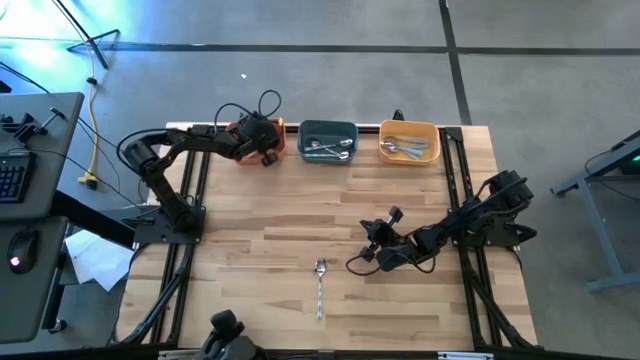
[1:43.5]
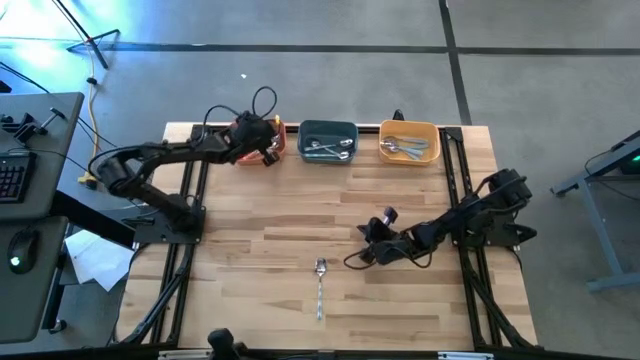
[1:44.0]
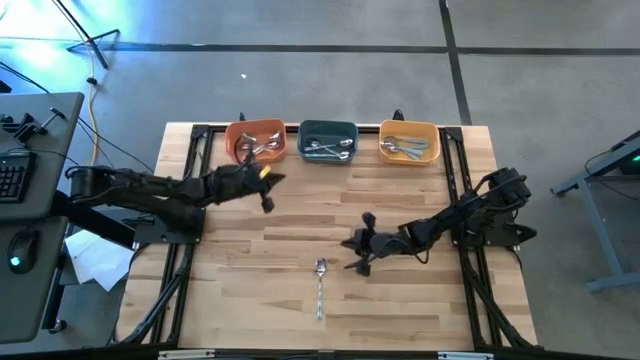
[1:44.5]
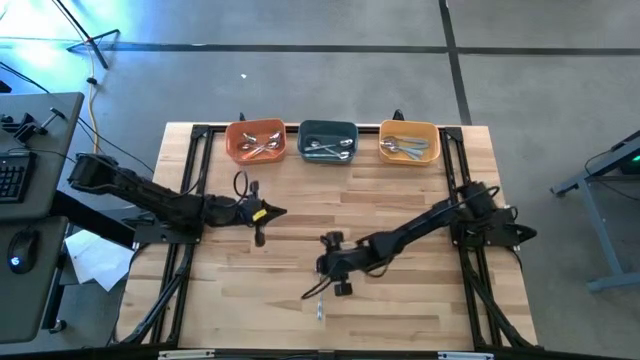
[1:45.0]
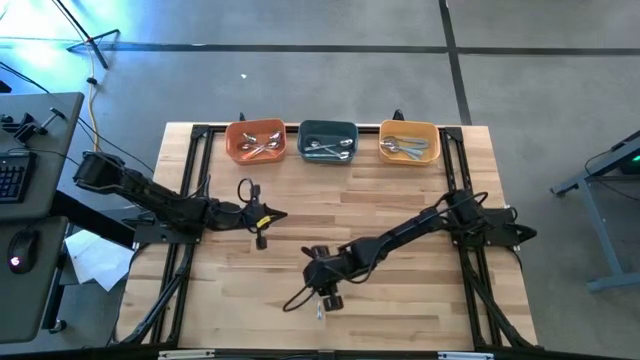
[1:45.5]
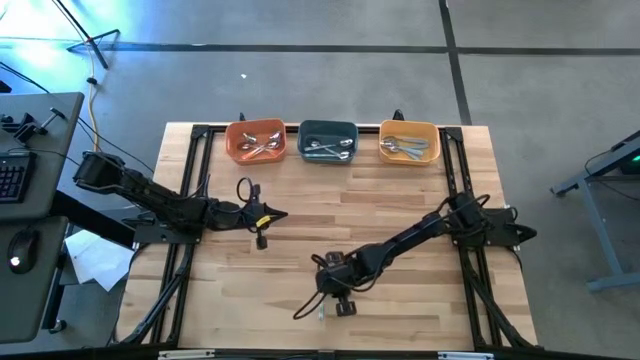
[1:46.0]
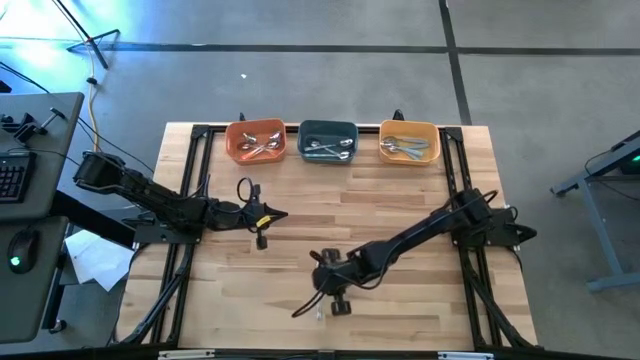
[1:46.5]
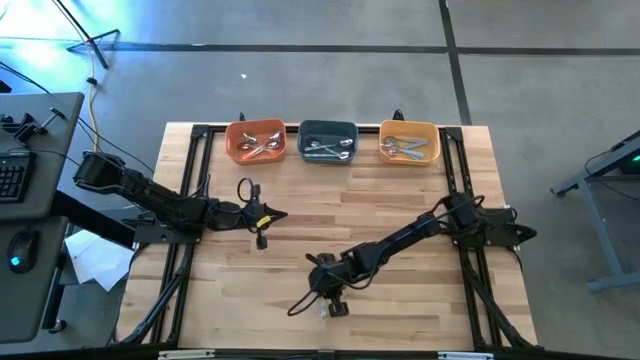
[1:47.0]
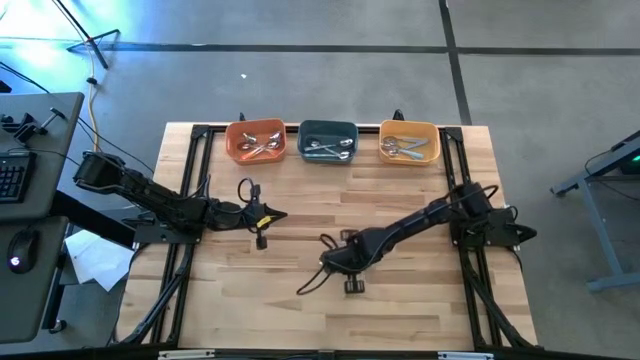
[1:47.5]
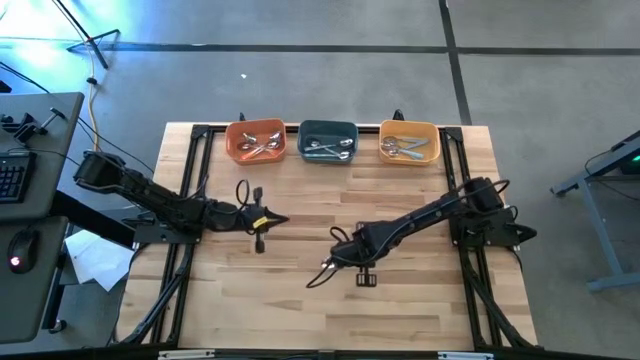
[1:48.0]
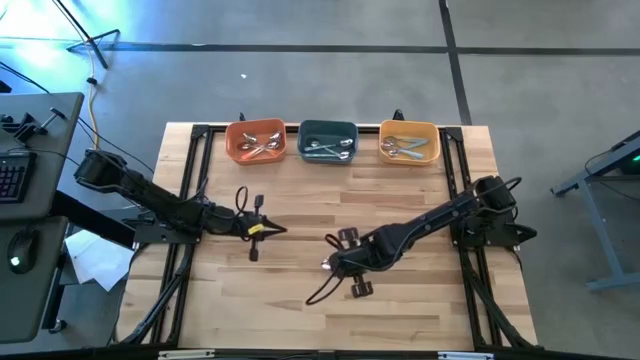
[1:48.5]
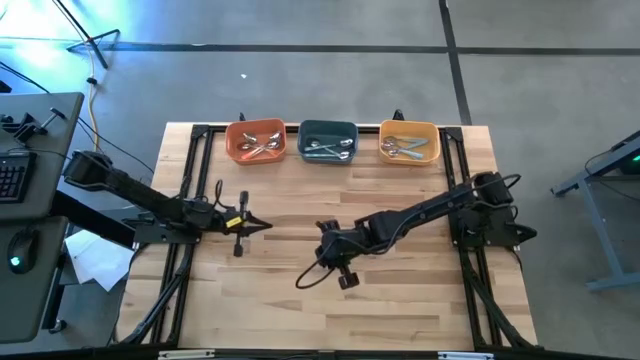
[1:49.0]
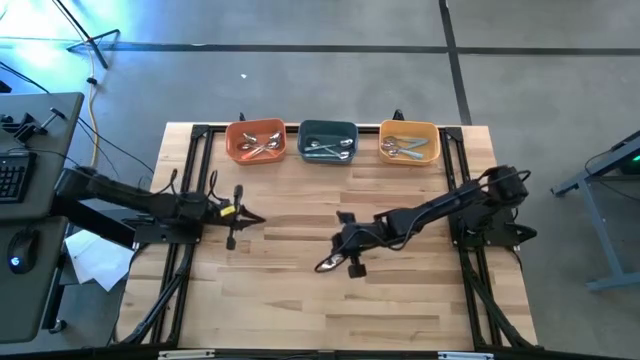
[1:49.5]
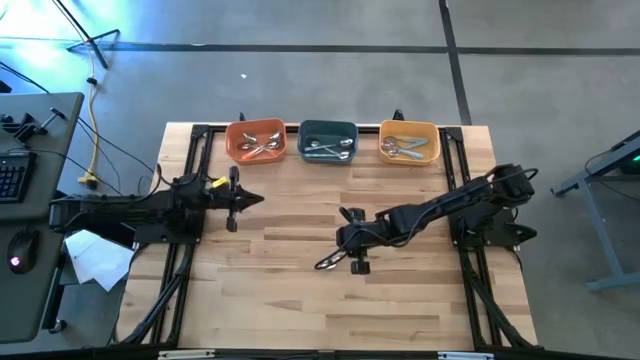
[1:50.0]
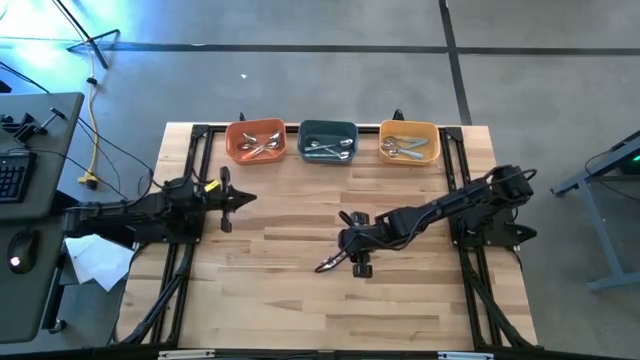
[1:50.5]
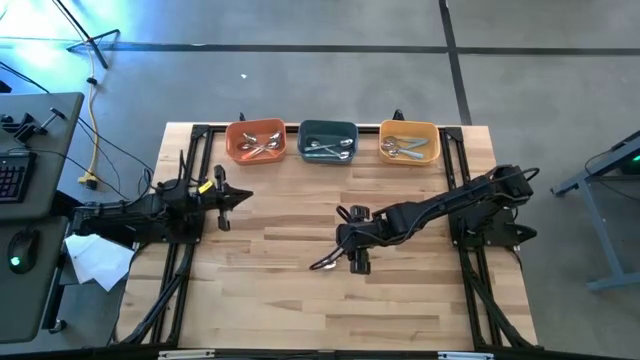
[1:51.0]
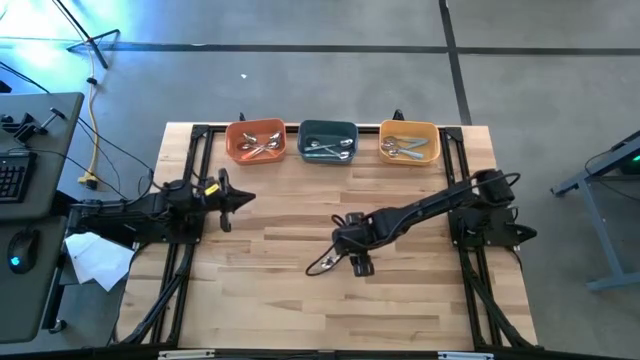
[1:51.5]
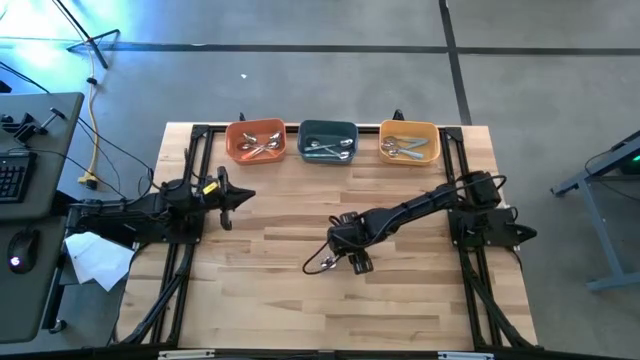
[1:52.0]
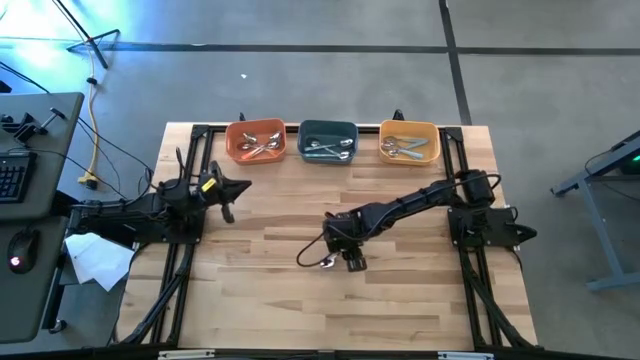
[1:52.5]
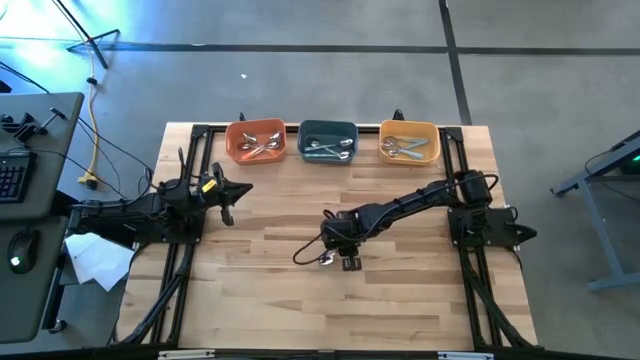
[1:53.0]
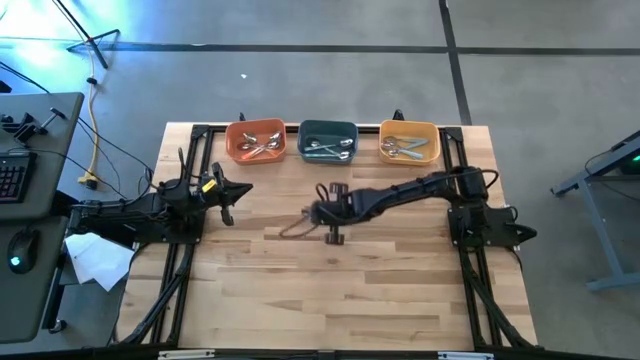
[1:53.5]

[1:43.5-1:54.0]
Task: Sort silverware by color (type)
Put the white spoon into the blue bin

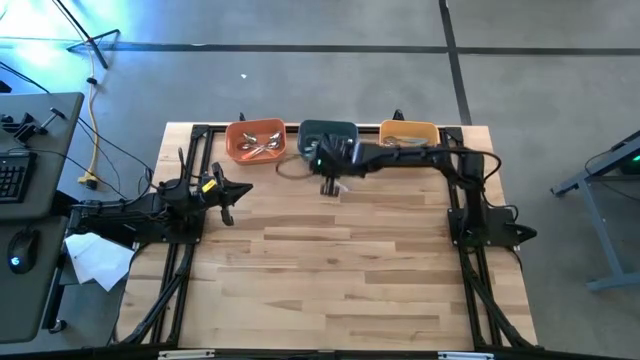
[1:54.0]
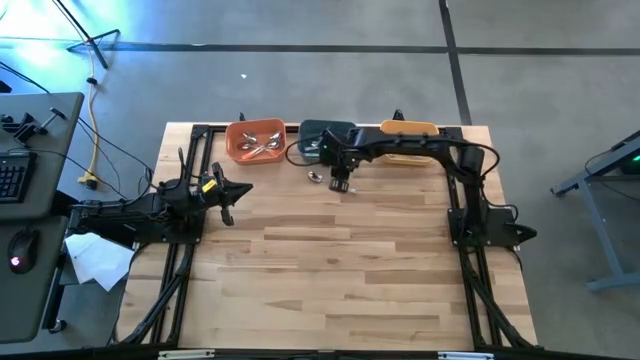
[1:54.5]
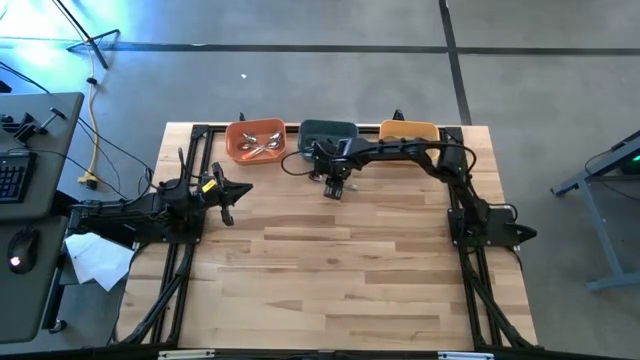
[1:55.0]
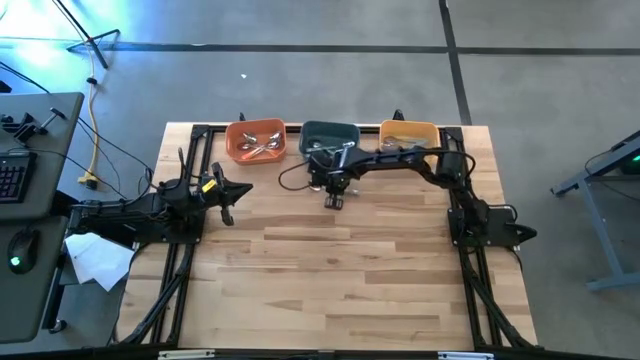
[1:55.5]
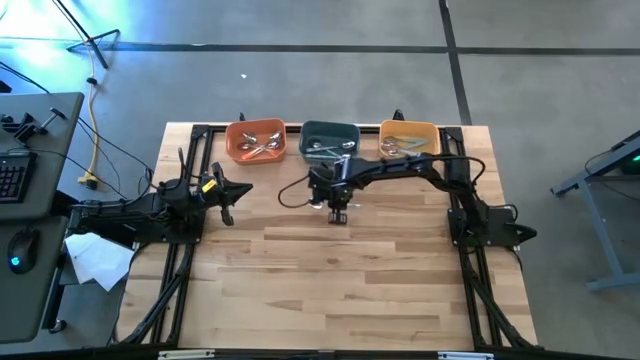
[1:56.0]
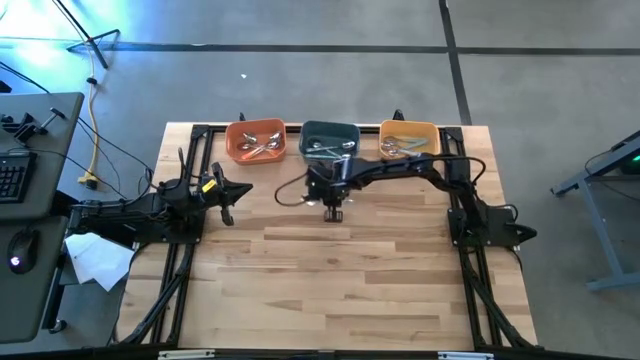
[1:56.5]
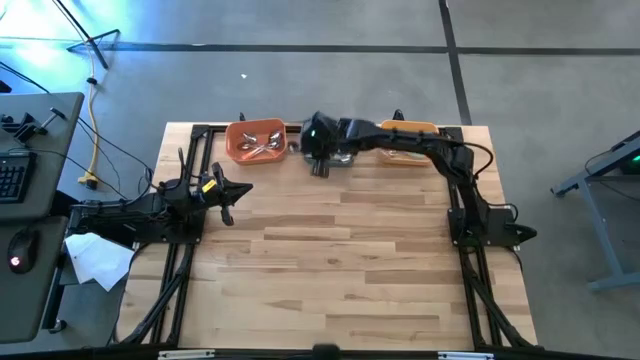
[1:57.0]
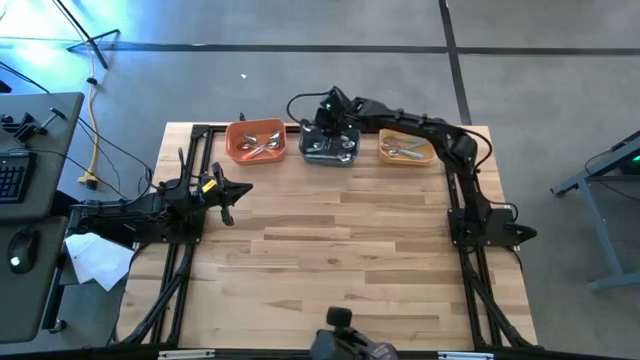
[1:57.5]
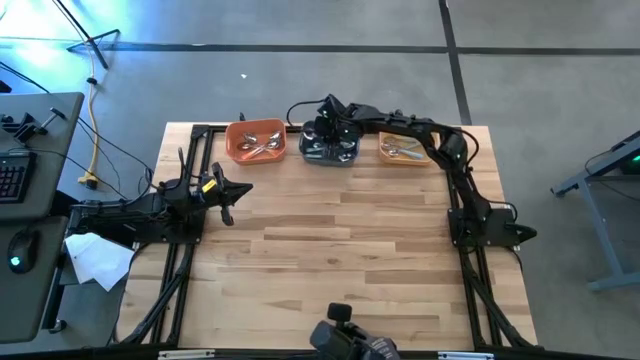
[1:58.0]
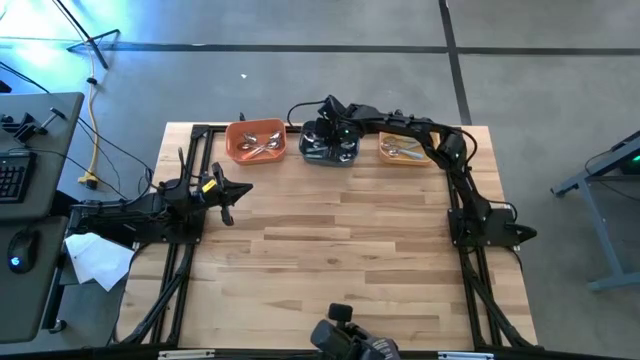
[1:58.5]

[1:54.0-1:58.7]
Put the white spoon into the blue bin

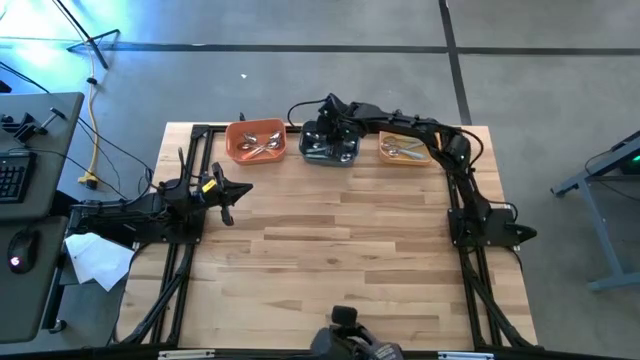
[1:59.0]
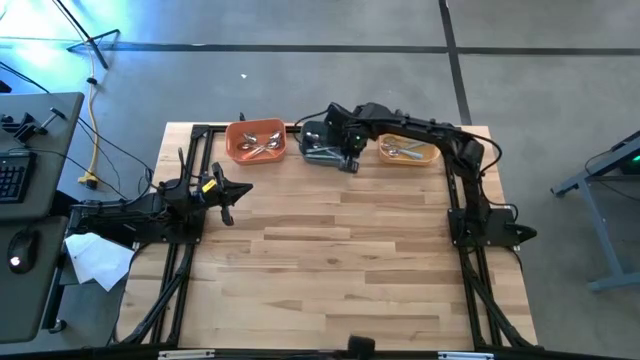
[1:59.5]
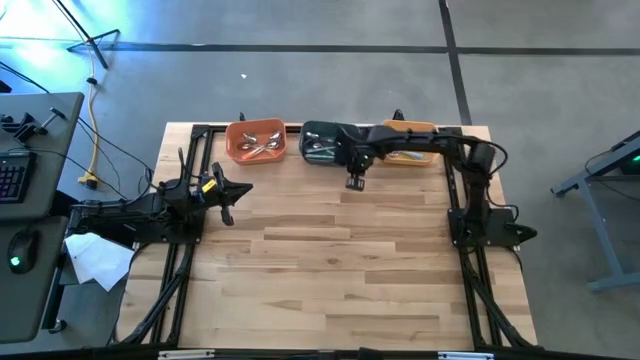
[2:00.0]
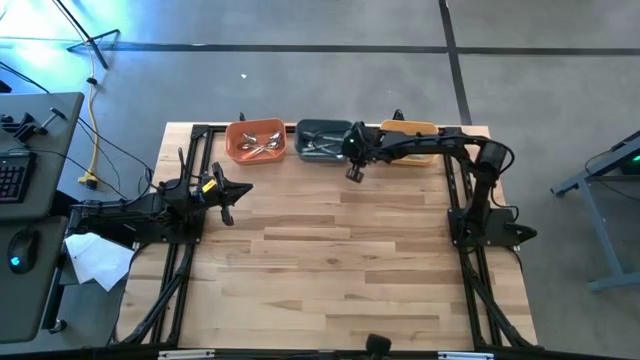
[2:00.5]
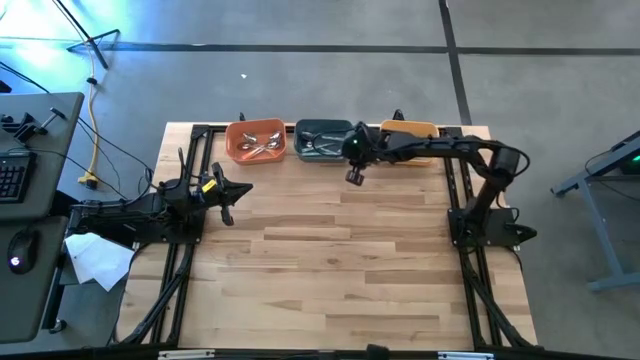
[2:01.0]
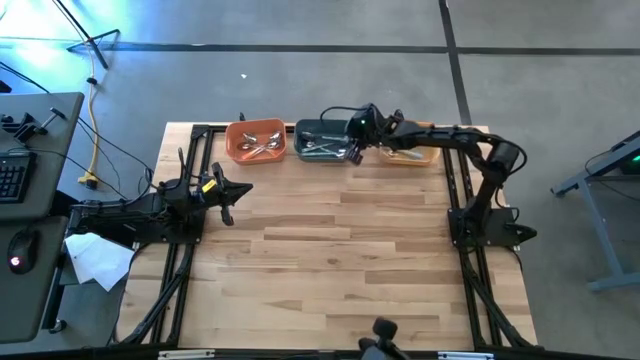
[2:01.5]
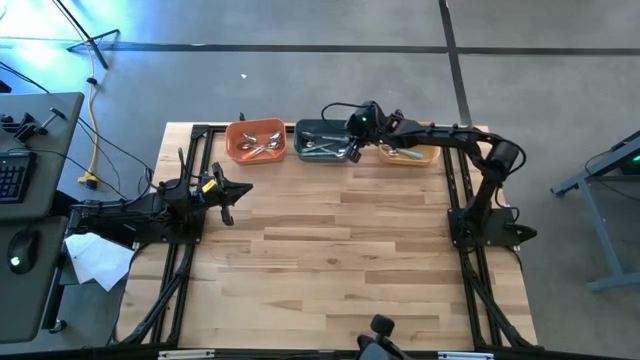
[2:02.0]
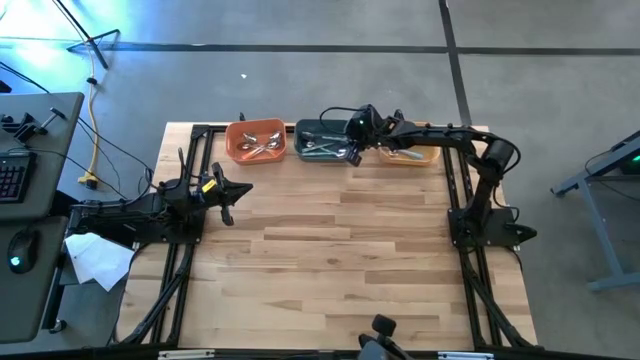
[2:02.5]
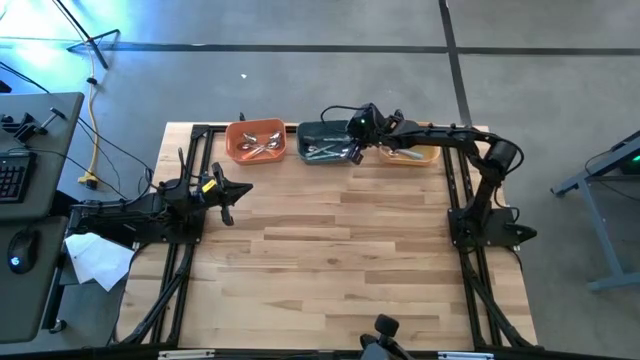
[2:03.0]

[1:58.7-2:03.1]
Adjust the blue bin

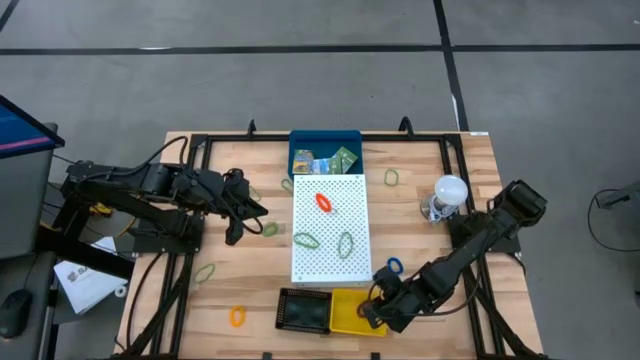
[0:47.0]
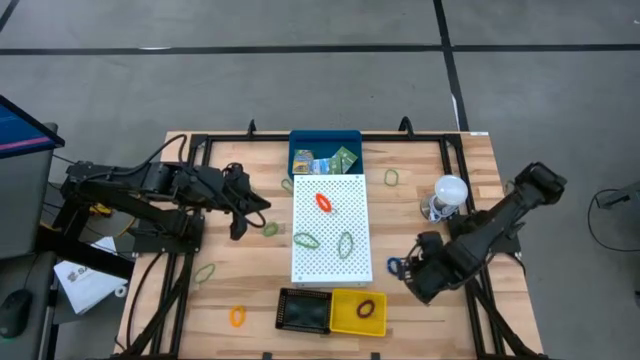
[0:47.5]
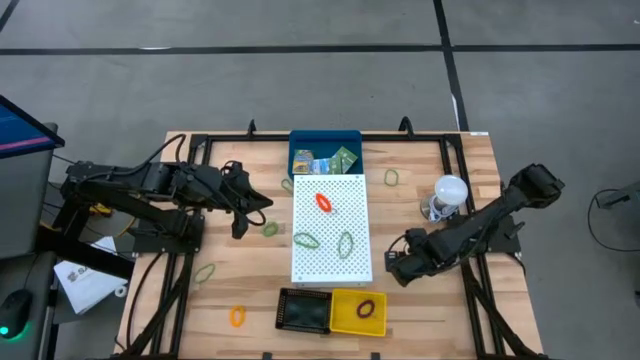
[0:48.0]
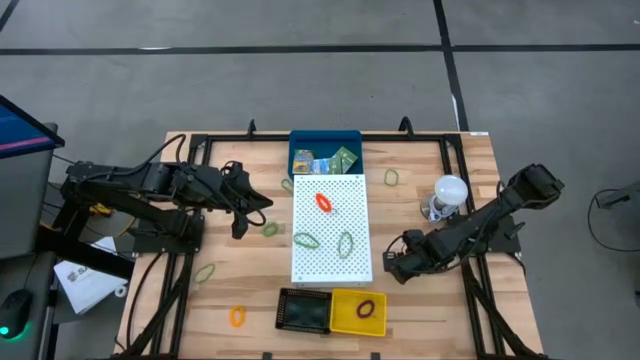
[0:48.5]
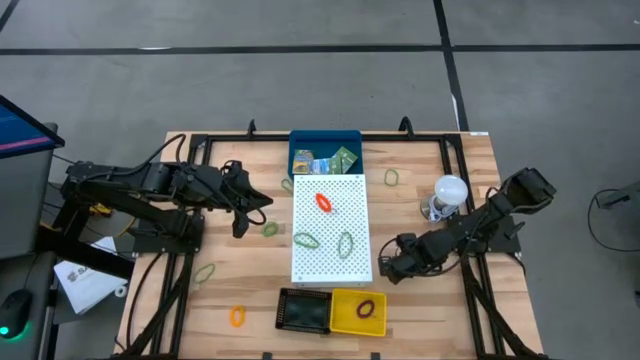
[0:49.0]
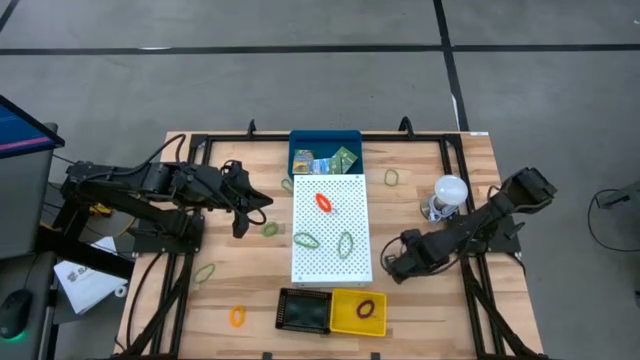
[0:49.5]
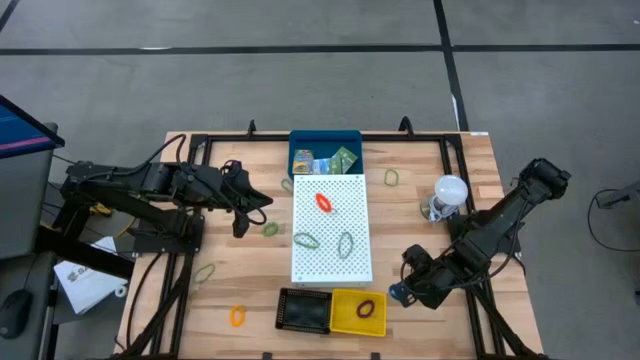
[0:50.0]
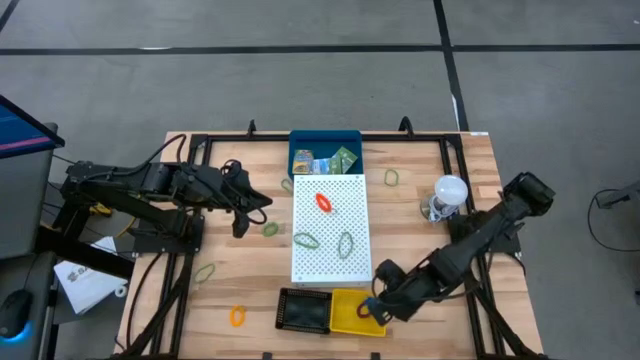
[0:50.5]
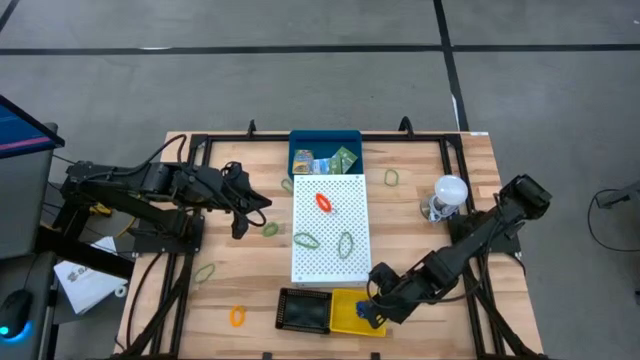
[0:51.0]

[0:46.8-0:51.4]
Task: Pick & Place Office Desk Supplies
Put the blue spring keychain into the yellow bin
